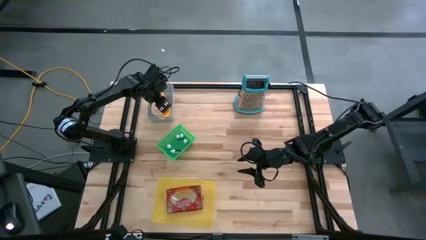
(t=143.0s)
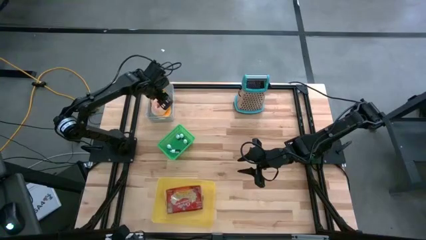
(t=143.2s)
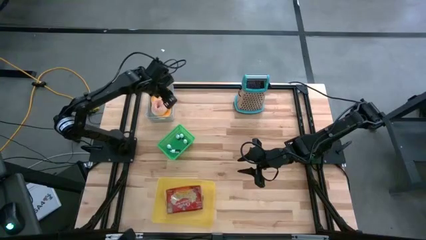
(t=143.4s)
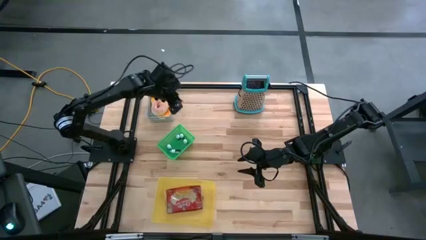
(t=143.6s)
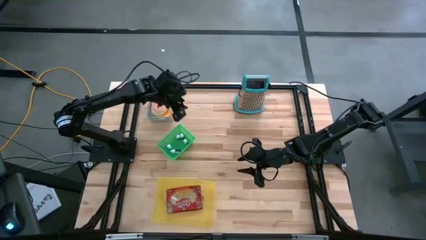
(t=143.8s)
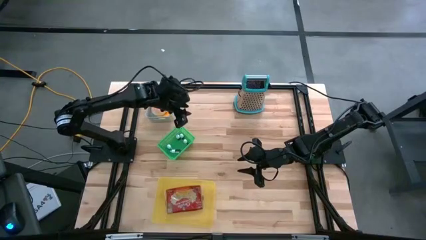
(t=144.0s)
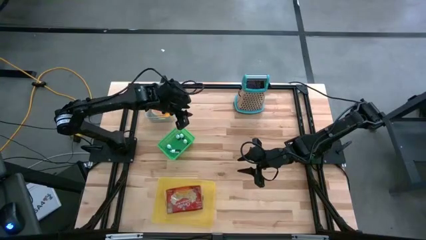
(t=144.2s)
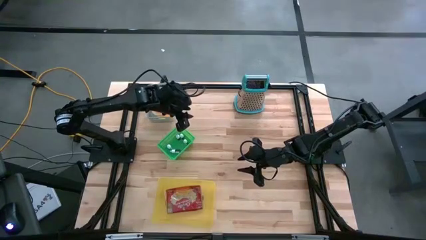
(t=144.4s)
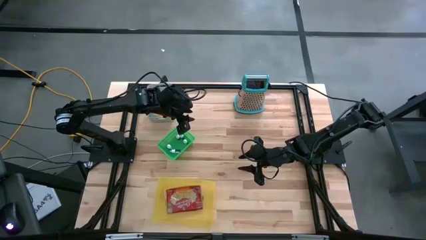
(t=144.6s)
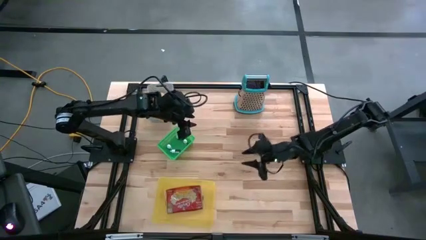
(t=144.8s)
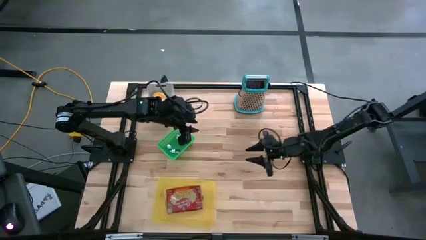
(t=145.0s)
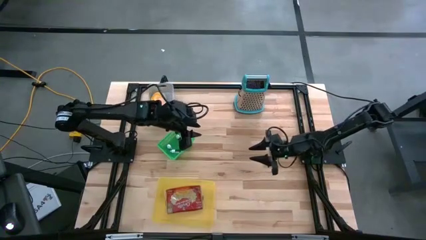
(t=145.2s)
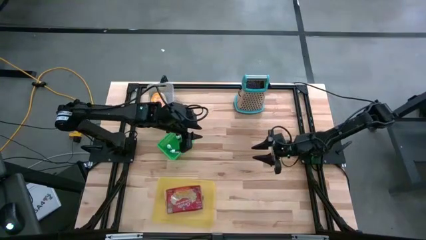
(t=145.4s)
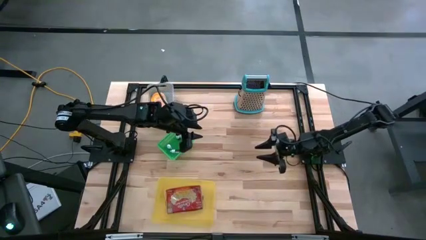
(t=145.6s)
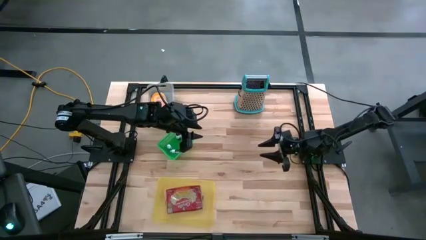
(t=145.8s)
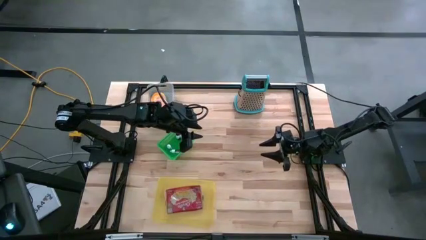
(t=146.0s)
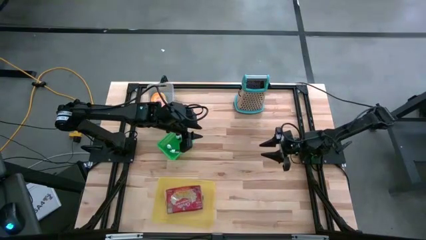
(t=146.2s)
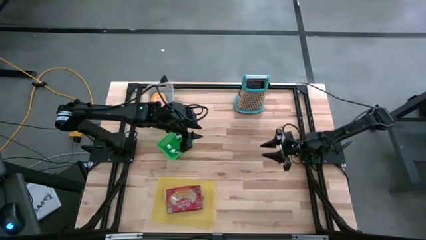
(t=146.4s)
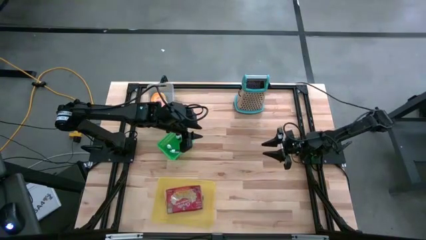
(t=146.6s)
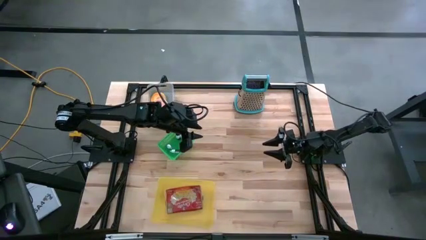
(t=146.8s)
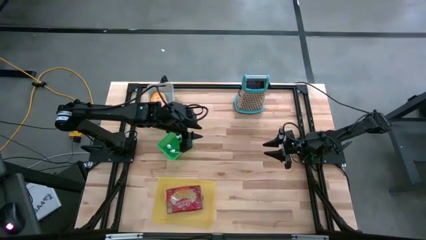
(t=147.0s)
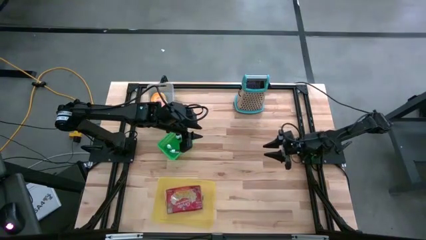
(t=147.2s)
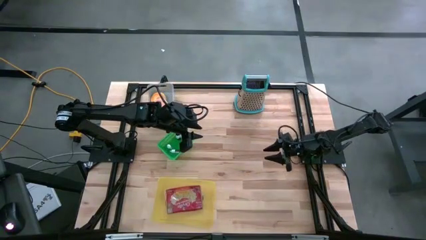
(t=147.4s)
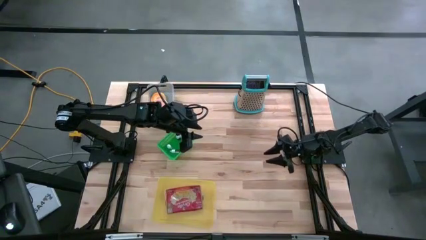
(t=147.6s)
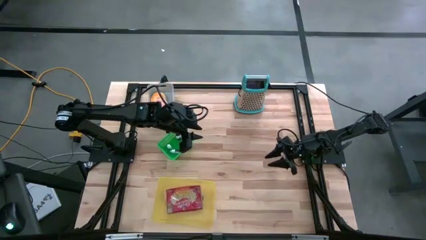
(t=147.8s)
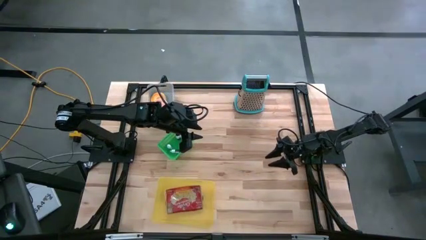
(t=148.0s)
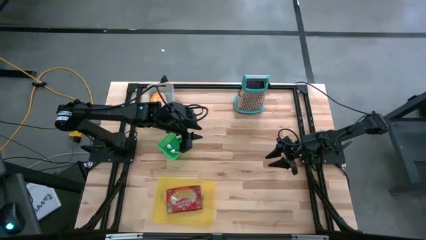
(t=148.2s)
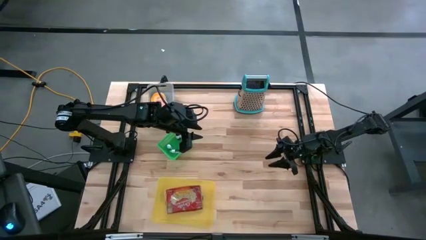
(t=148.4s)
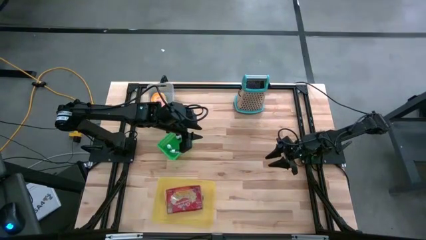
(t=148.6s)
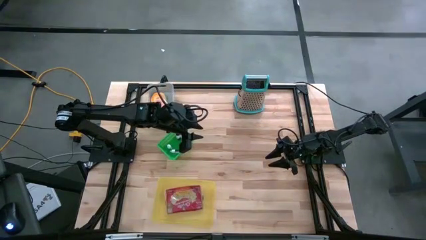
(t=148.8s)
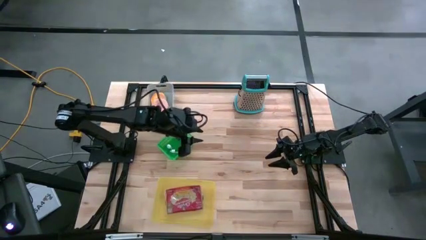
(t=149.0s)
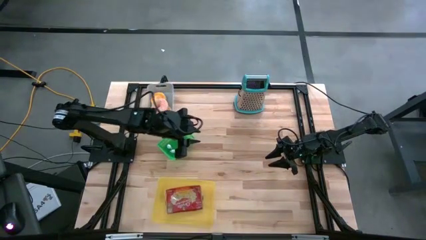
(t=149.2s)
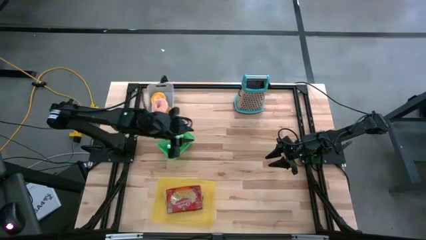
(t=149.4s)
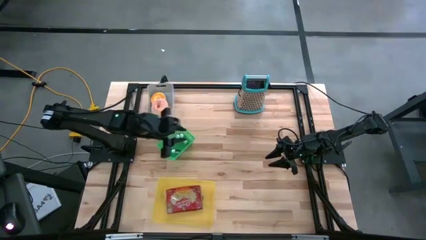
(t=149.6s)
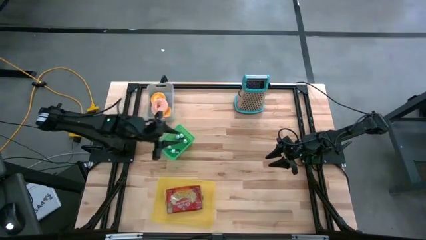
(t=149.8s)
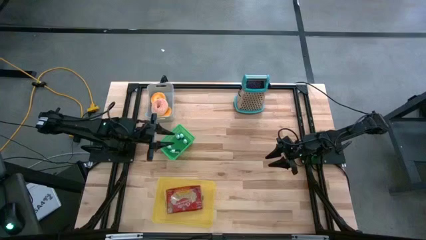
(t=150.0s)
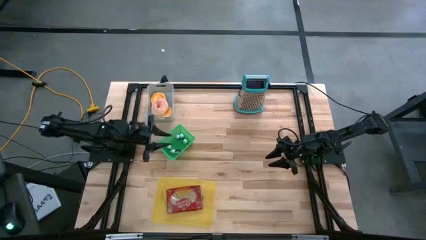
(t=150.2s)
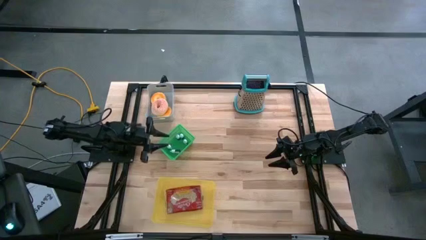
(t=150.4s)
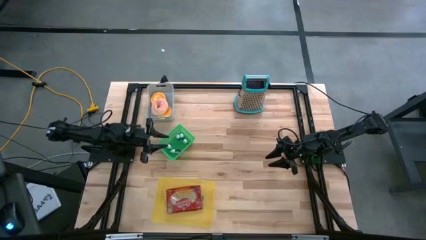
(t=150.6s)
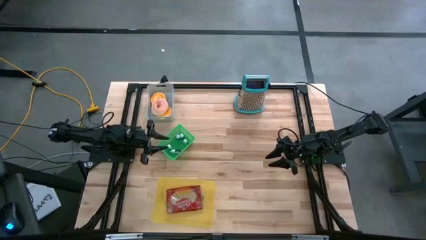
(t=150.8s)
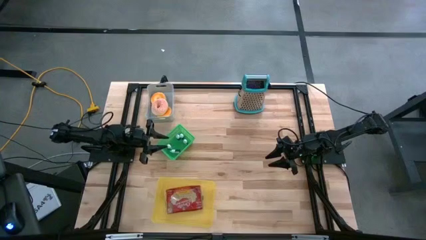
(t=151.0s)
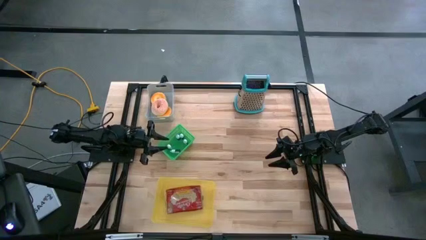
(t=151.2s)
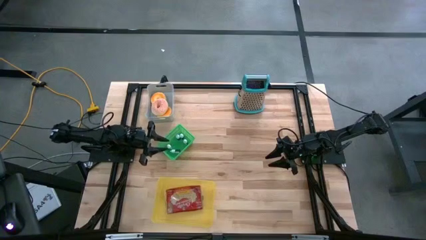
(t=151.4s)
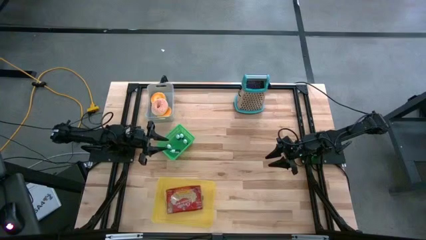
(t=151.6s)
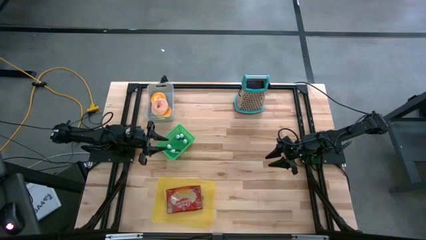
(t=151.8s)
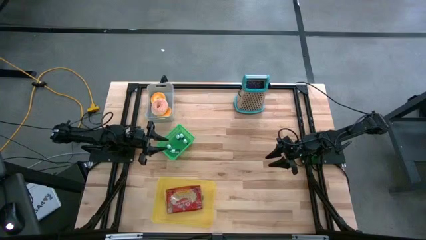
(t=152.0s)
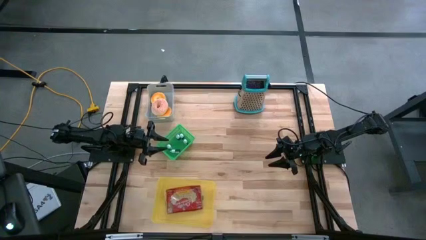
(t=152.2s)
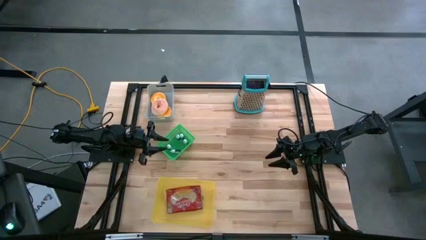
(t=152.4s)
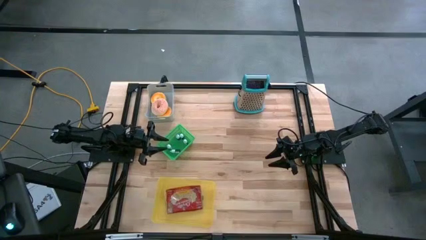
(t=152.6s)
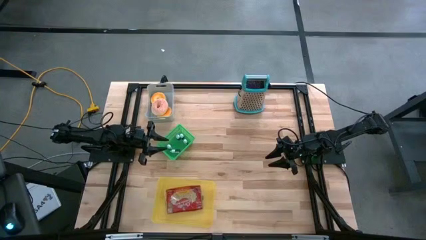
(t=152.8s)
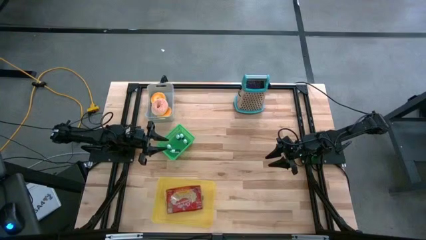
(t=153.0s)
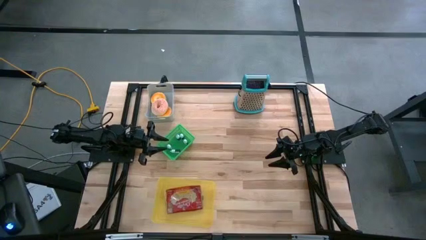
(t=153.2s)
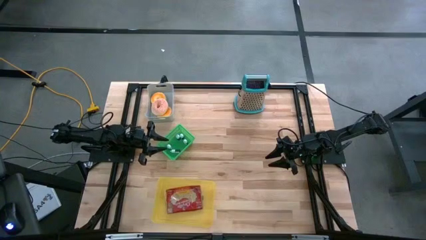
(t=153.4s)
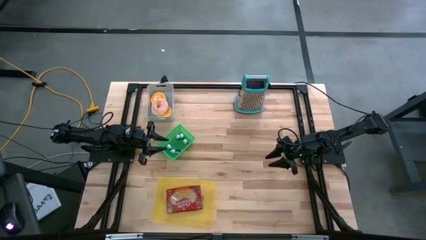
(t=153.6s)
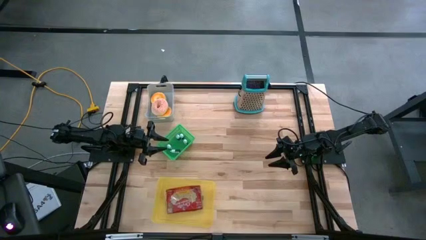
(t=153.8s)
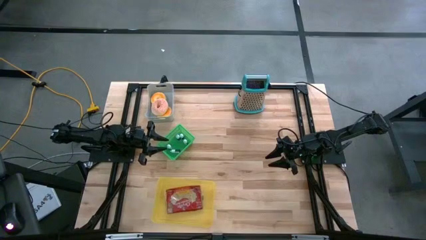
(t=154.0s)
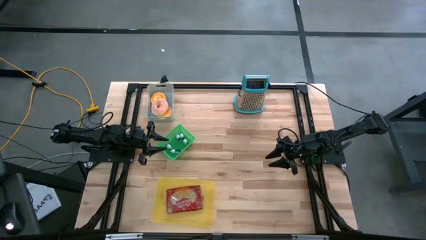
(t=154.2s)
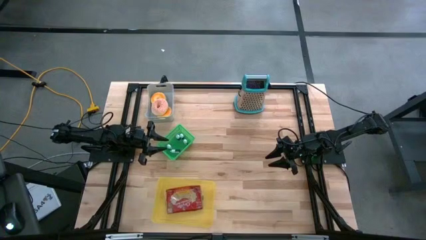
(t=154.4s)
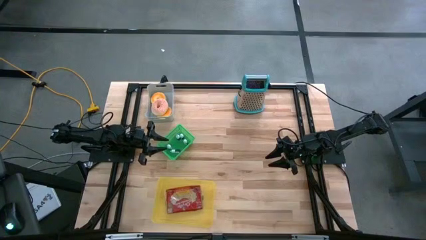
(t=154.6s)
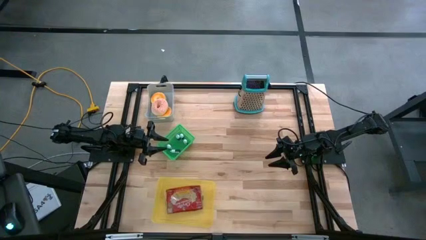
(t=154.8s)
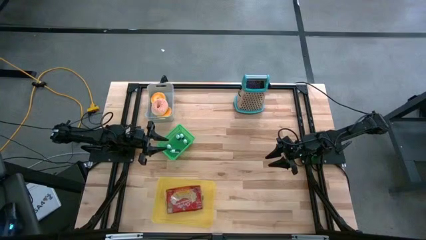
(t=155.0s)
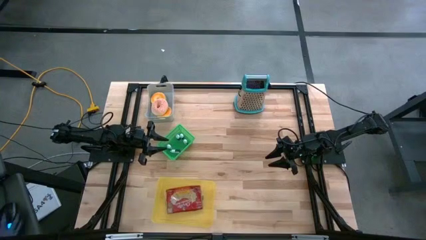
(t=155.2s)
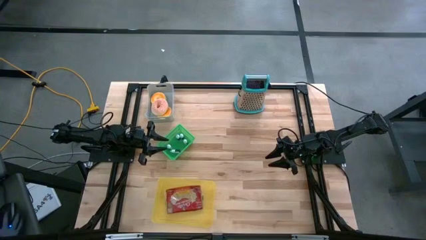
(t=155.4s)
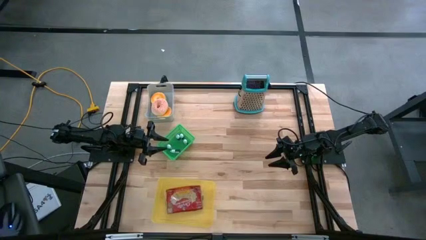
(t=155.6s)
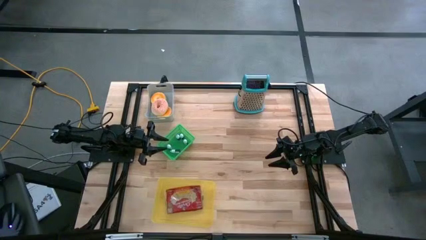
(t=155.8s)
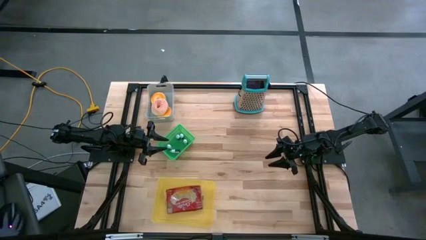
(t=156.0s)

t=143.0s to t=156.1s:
Return to Home Position
